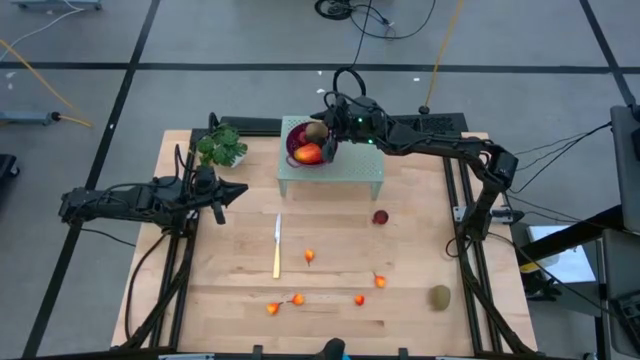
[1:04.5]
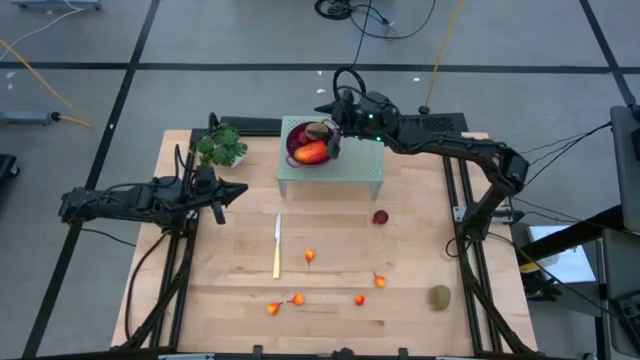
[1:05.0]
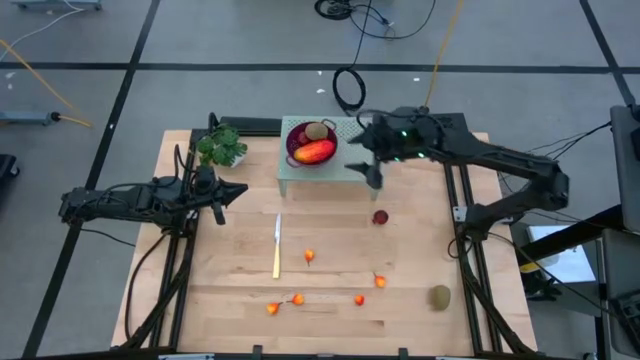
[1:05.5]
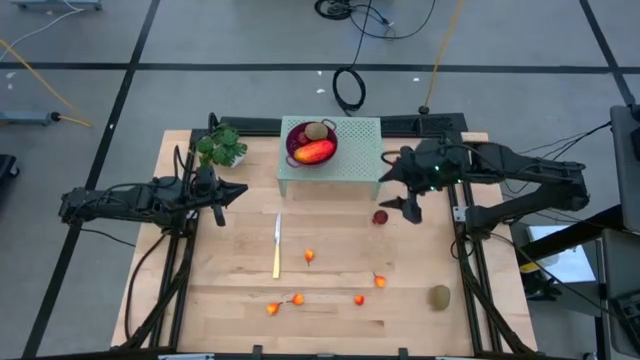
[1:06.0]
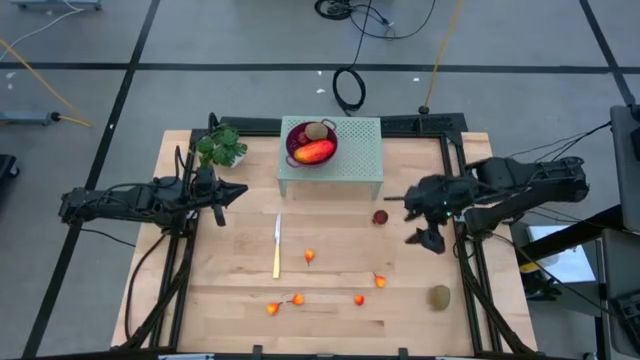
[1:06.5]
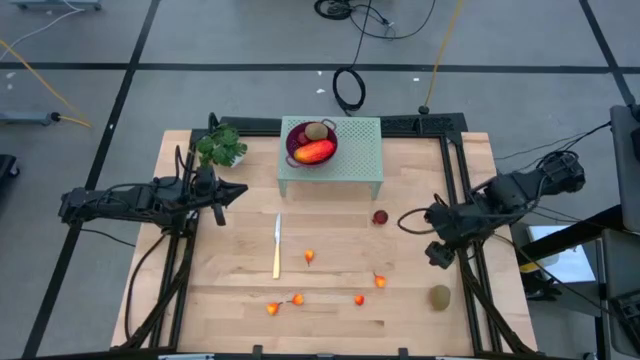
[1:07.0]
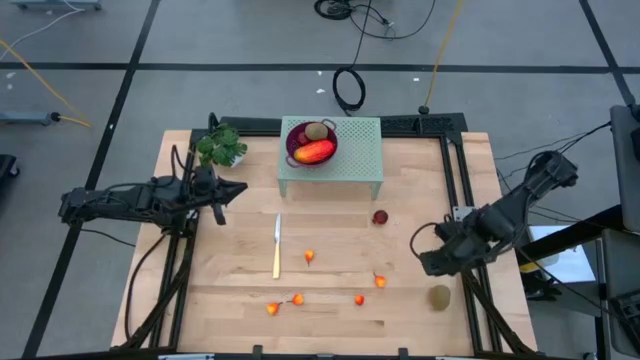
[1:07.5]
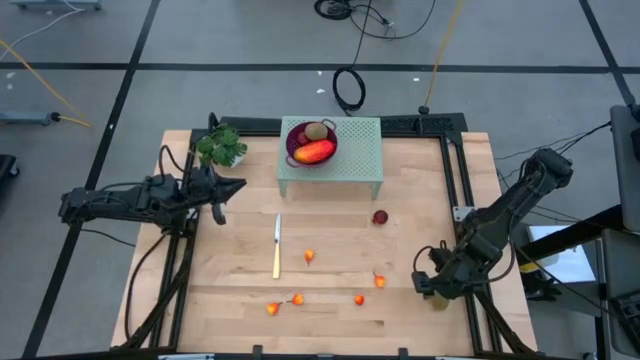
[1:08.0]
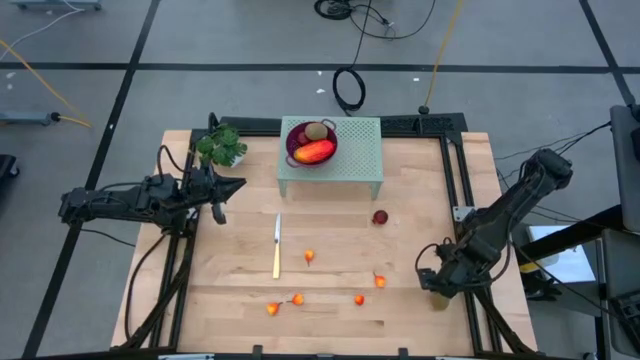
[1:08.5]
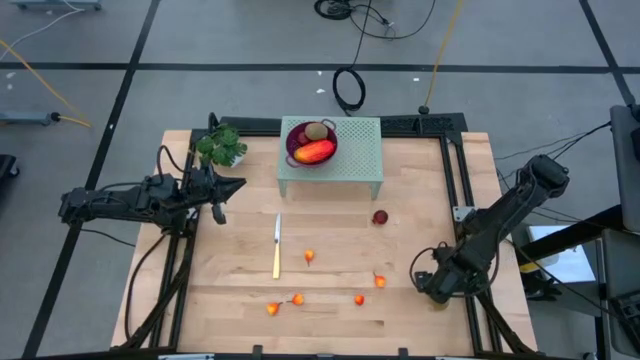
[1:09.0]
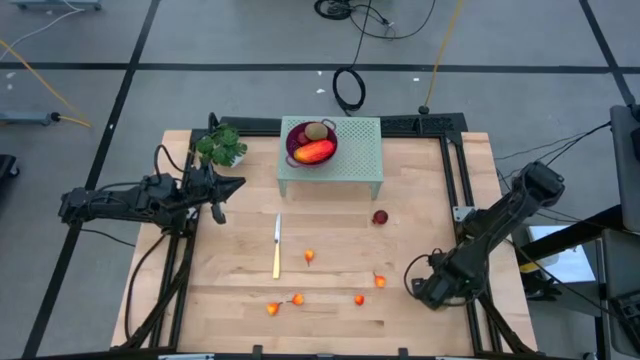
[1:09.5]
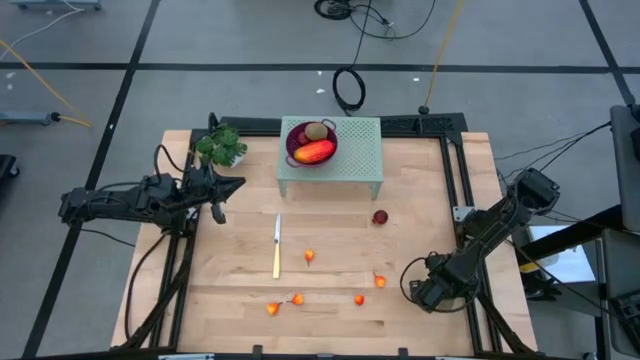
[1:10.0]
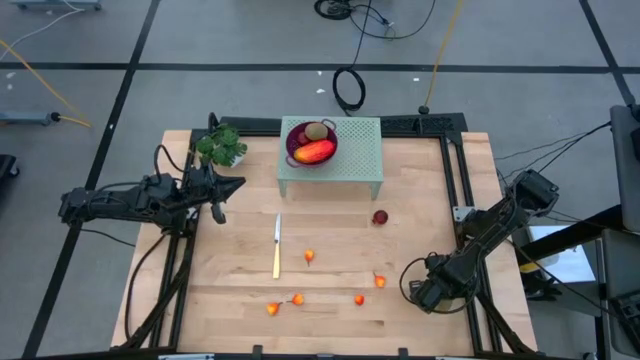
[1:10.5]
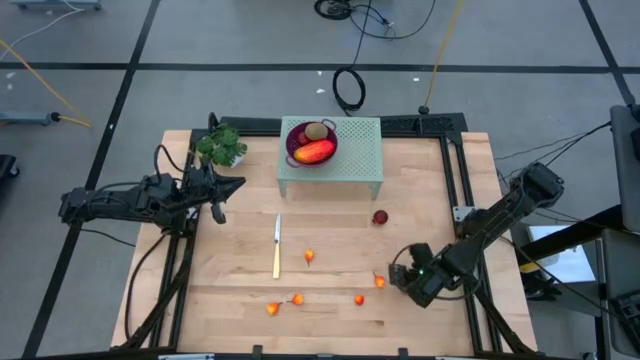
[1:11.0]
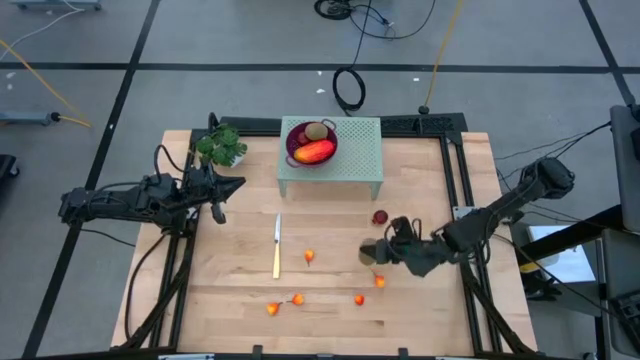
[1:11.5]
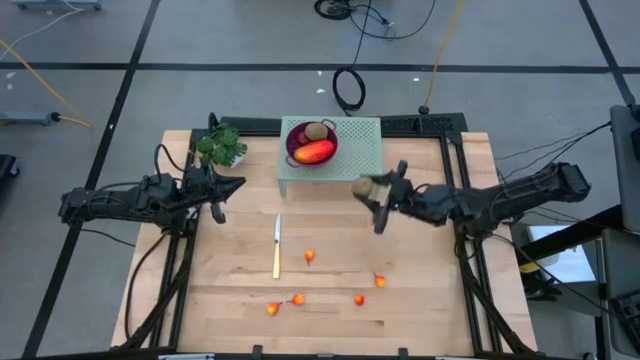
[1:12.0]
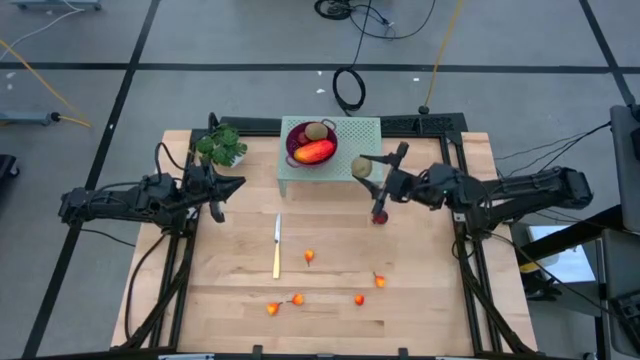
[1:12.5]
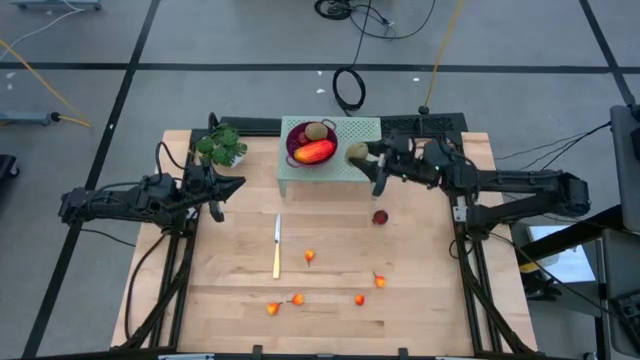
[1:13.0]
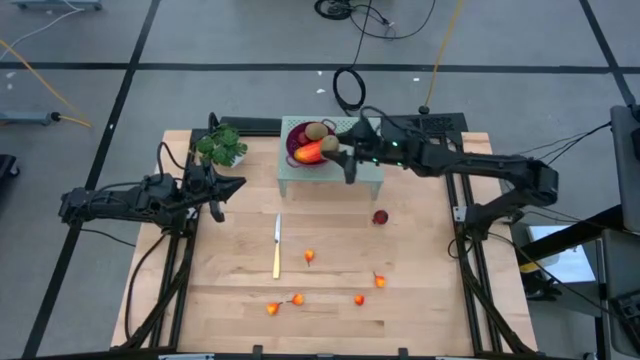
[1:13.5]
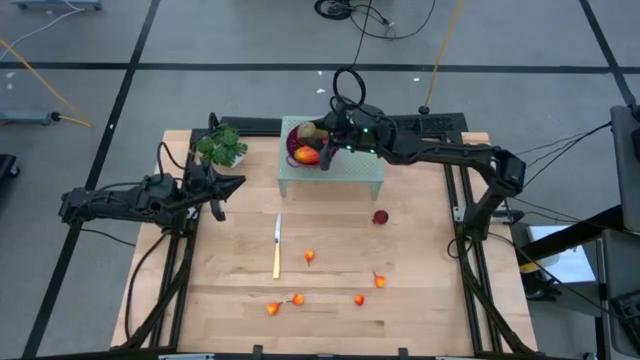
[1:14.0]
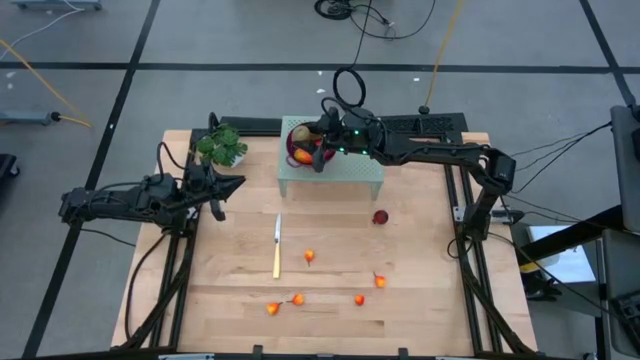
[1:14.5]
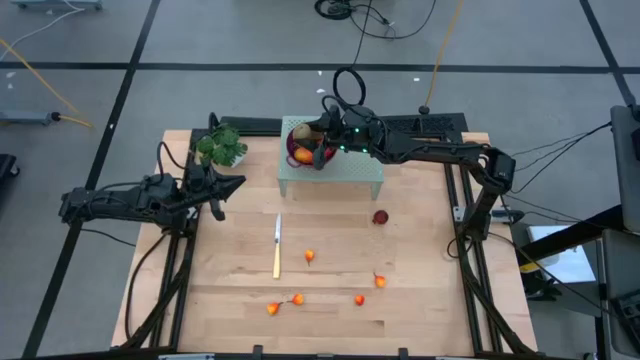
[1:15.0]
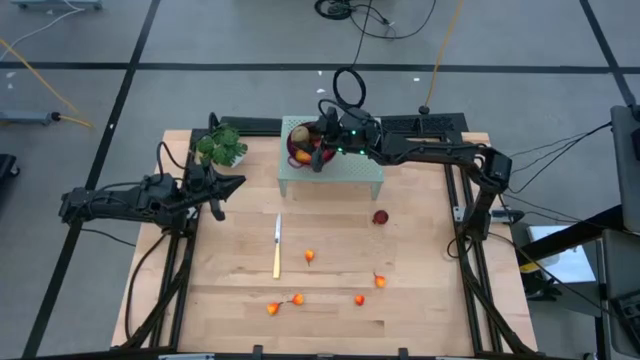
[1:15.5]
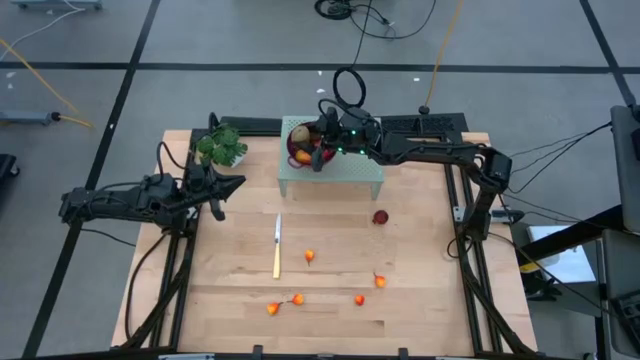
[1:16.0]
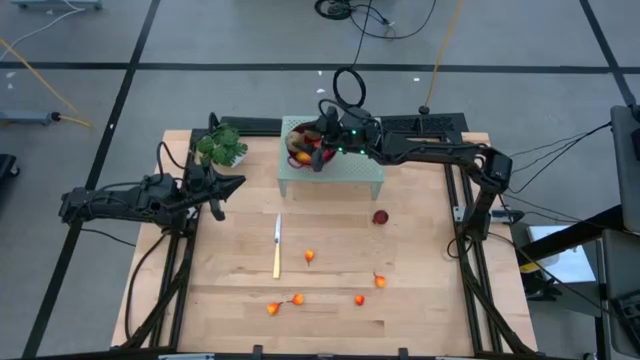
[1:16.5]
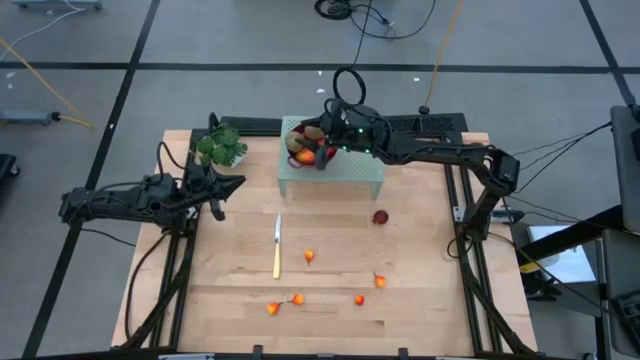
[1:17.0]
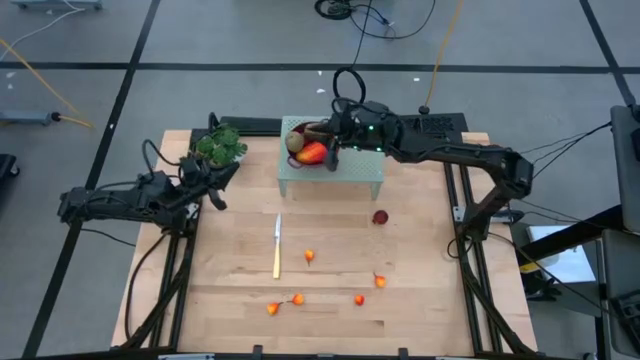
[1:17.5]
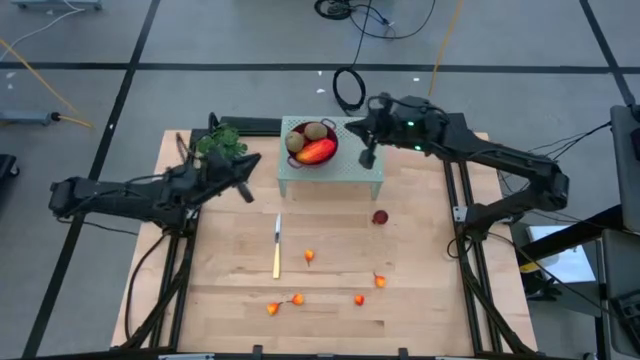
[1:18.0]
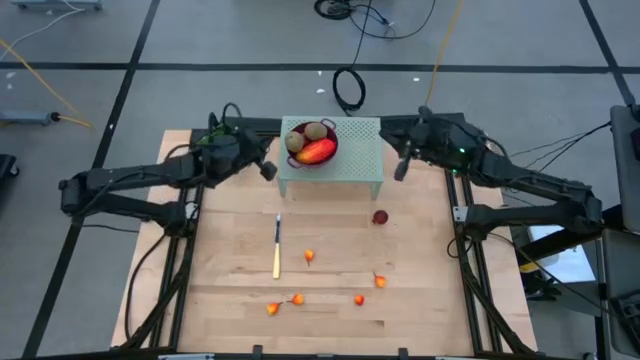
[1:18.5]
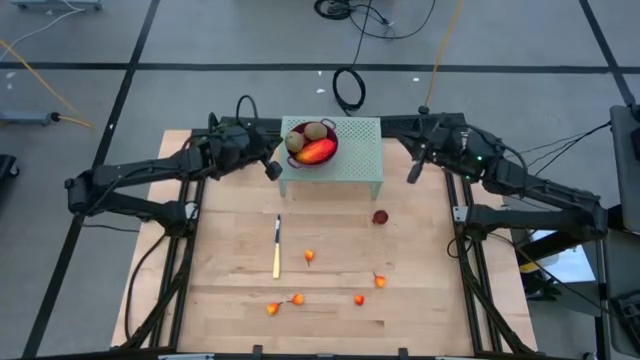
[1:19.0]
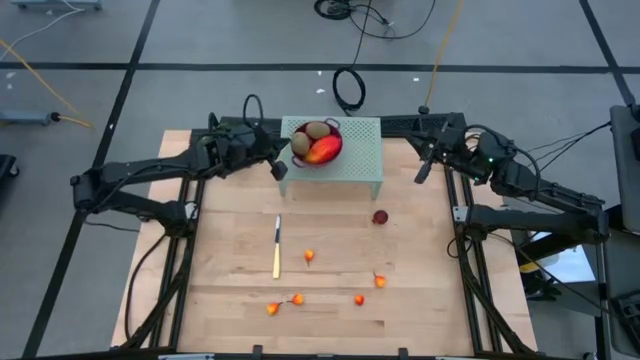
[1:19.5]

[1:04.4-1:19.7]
Task: Pick & Place Fruit
Put the kiwi into the strainer bowl on the shelf

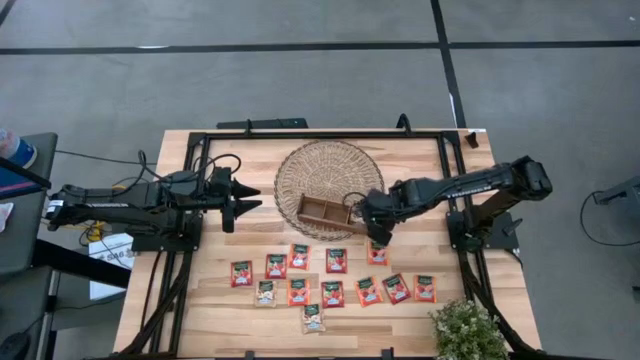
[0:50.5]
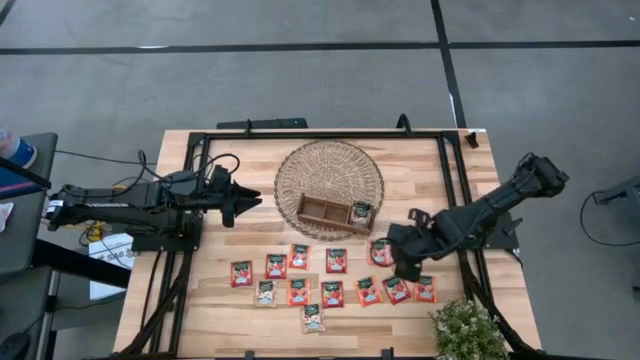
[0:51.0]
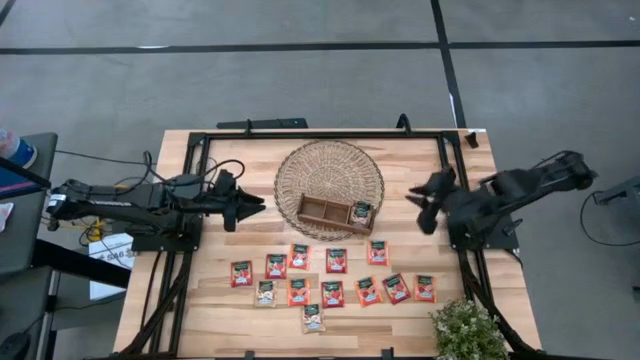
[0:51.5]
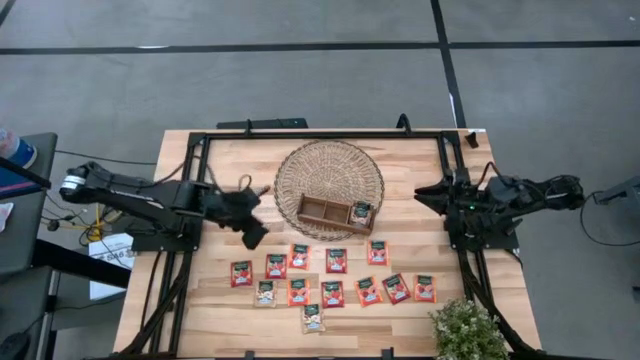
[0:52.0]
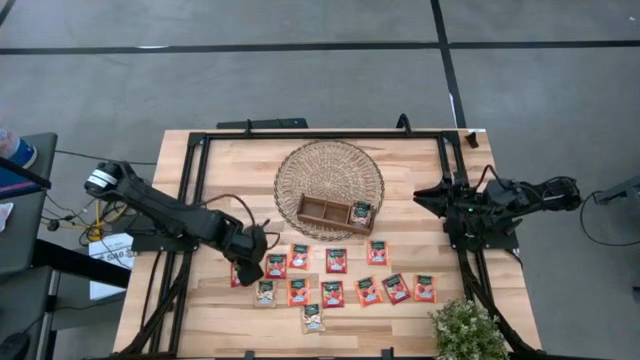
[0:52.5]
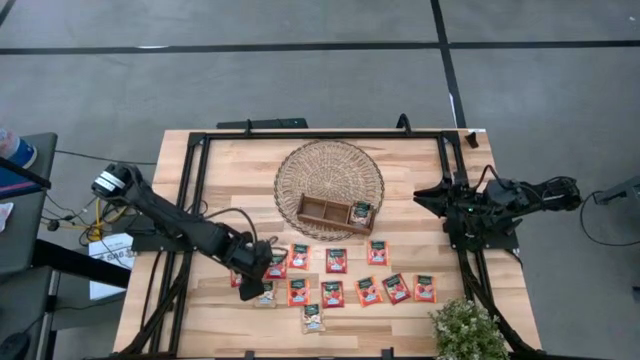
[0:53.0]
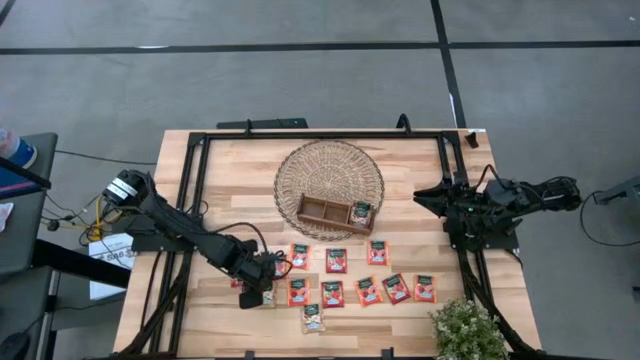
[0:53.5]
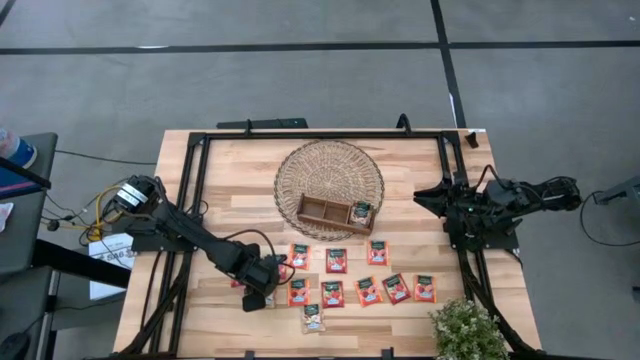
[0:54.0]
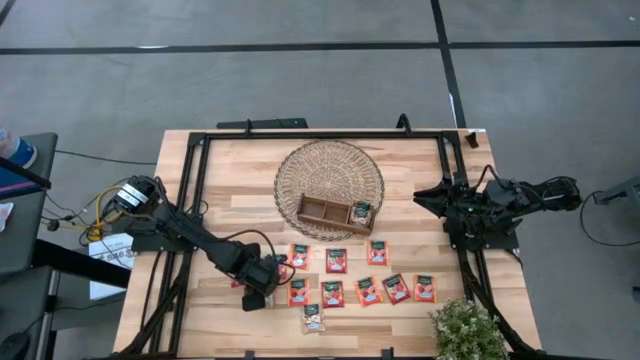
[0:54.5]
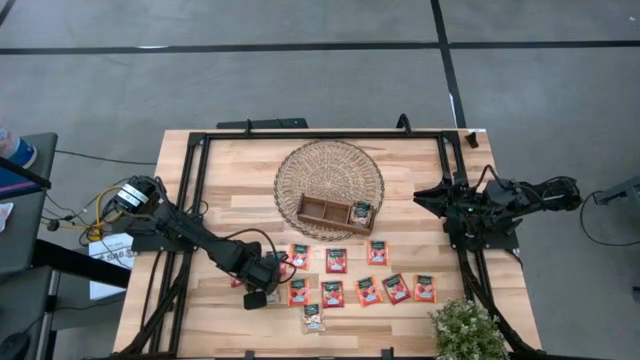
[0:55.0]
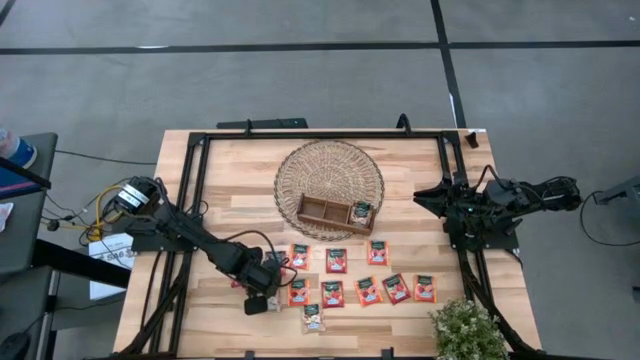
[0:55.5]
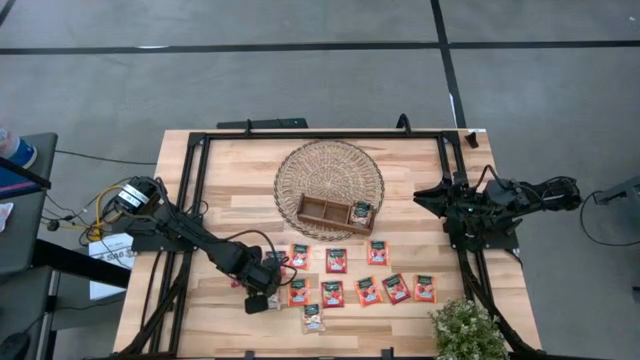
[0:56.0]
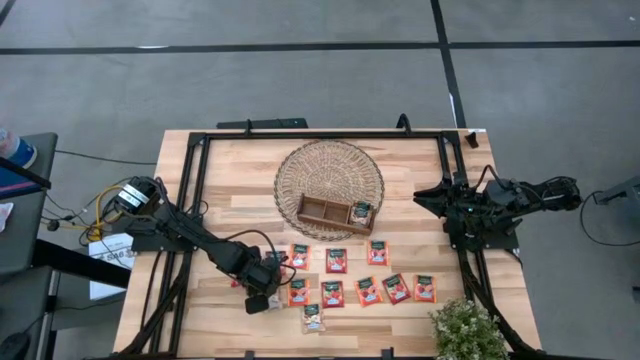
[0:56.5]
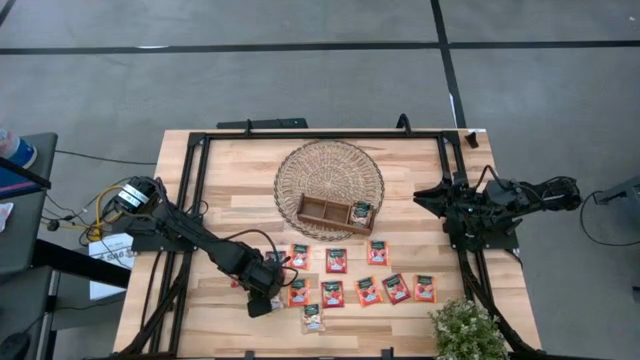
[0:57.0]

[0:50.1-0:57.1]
Task: Pick & Place Tea
Put the brown tea bag into the right section of the wooden organizer
